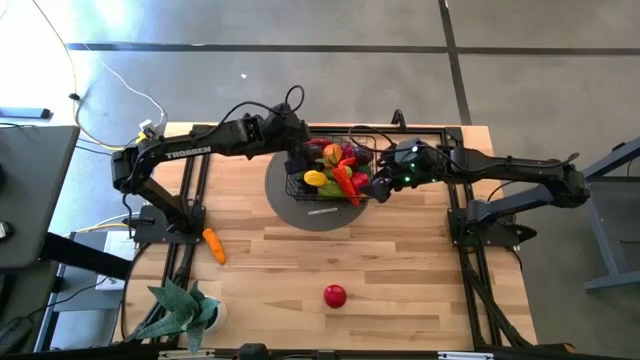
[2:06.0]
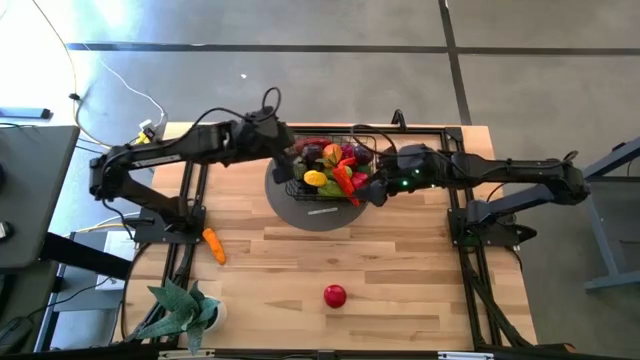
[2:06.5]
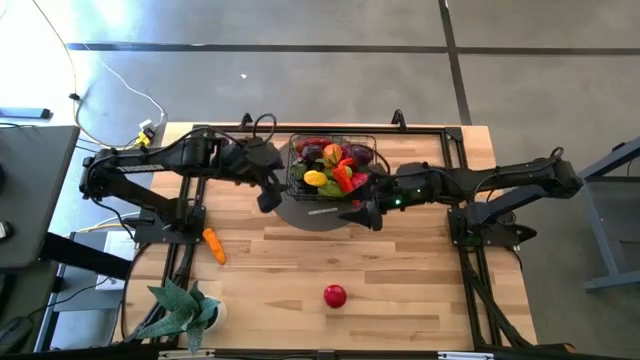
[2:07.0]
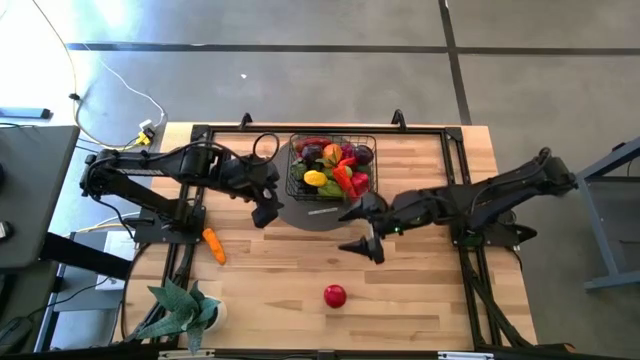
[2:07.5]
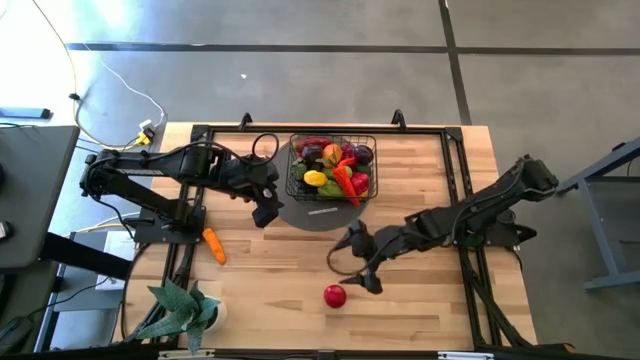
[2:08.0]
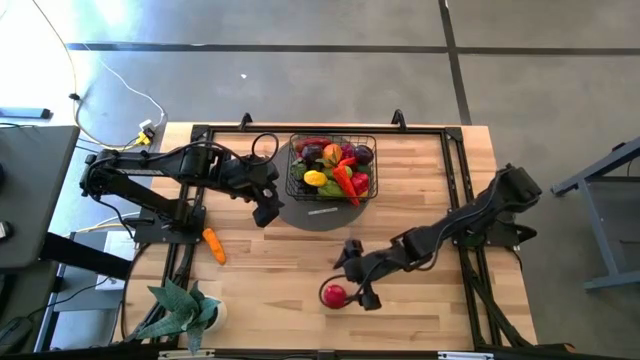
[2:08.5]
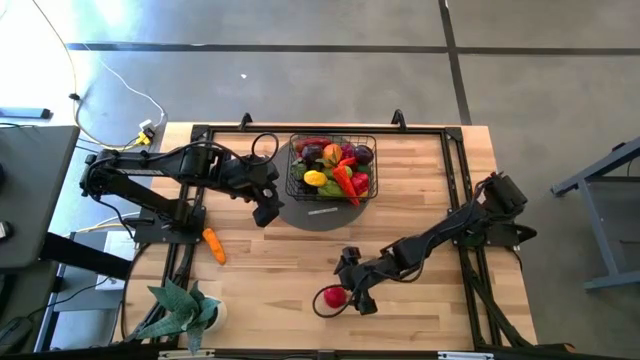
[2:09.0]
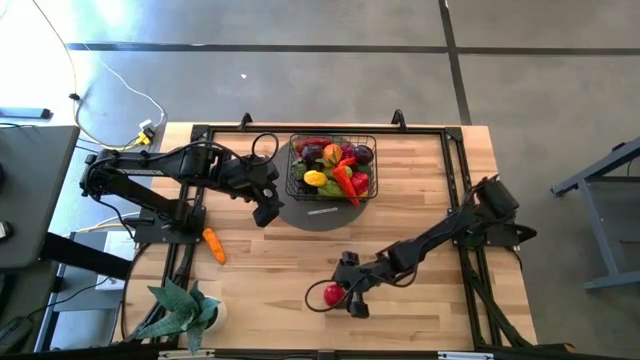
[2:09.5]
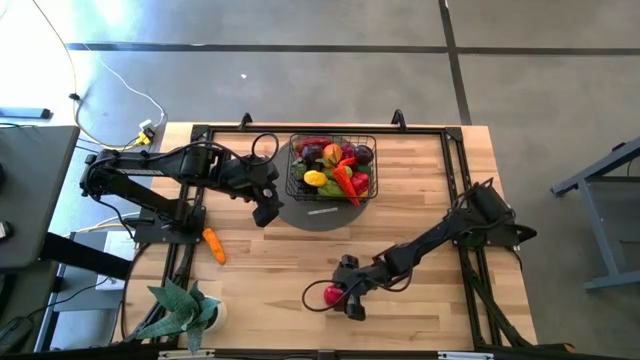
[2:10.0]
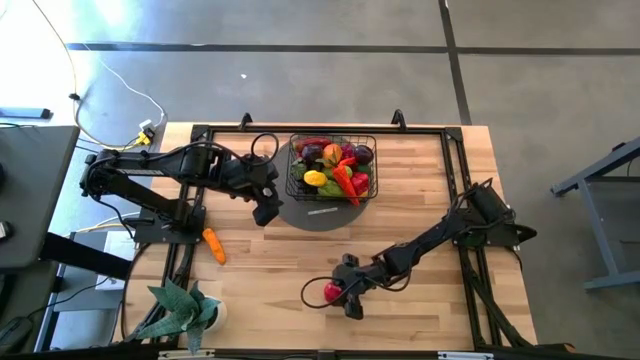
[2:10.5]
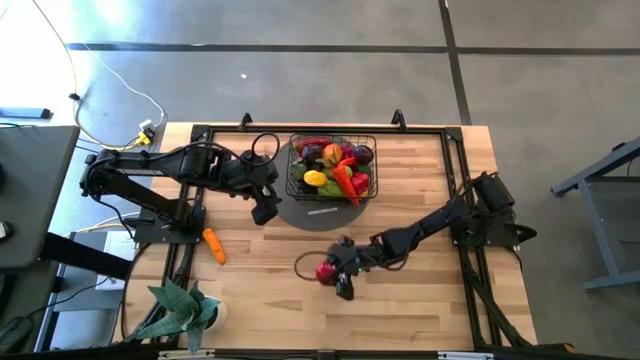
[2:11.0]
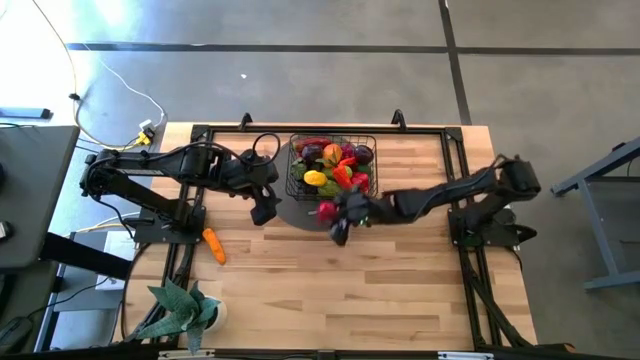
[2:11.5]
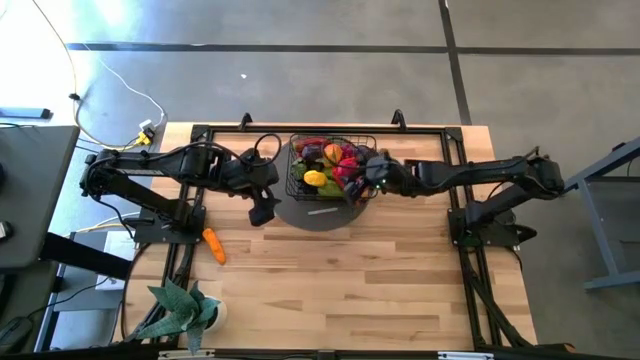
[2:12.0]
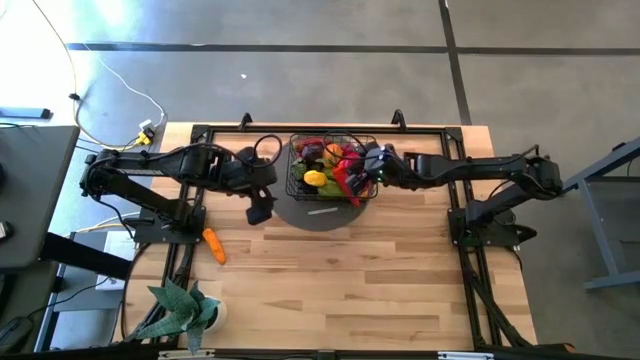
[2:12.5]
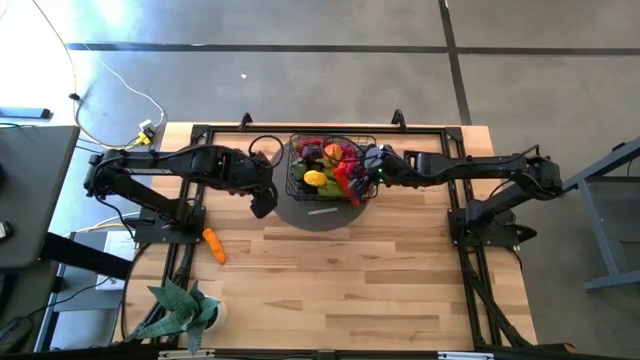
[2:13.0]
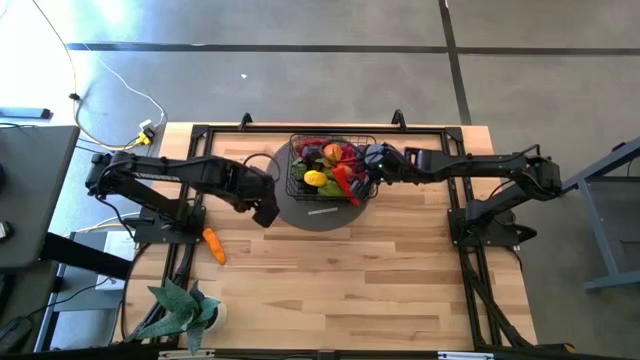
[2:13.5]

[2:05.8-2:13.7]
Task: Build produce basket
Put the red tomato into the black mesh basket

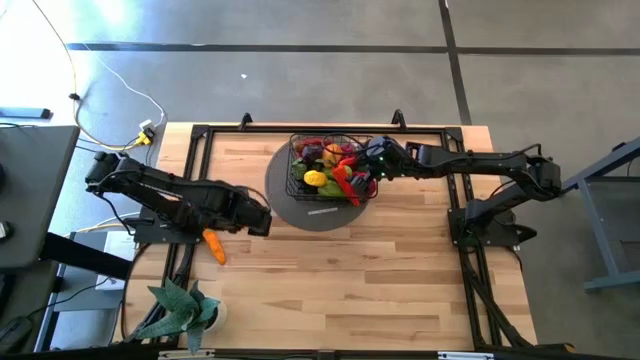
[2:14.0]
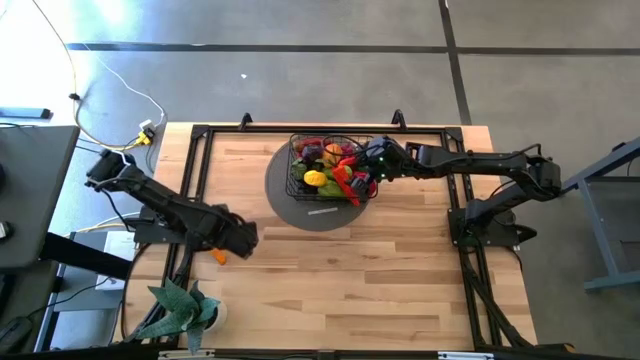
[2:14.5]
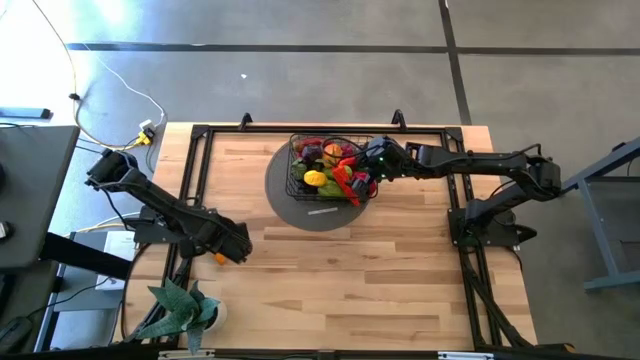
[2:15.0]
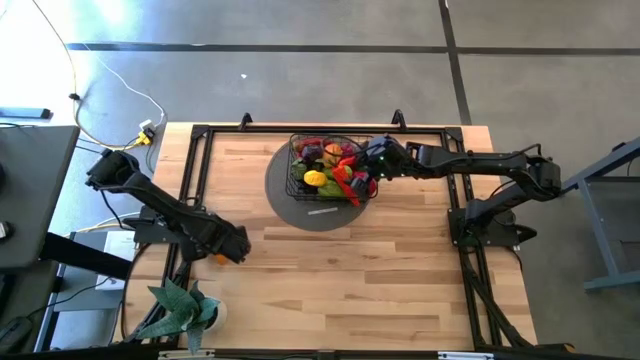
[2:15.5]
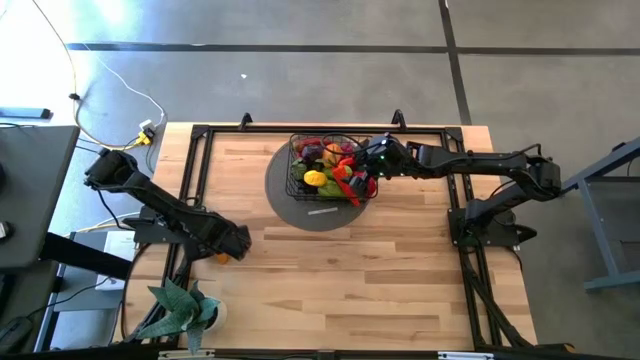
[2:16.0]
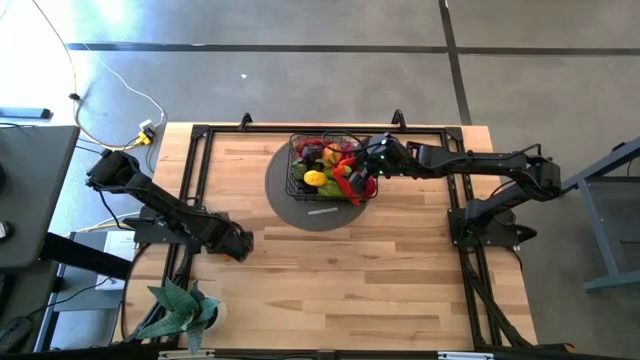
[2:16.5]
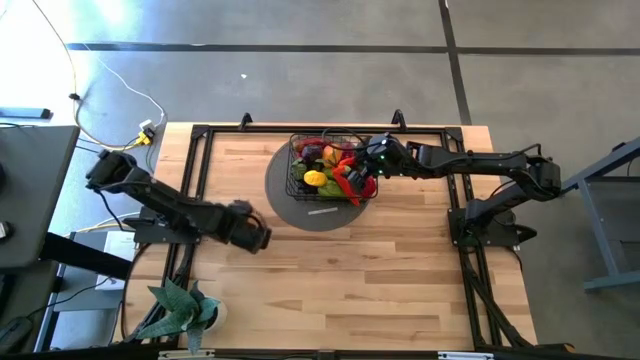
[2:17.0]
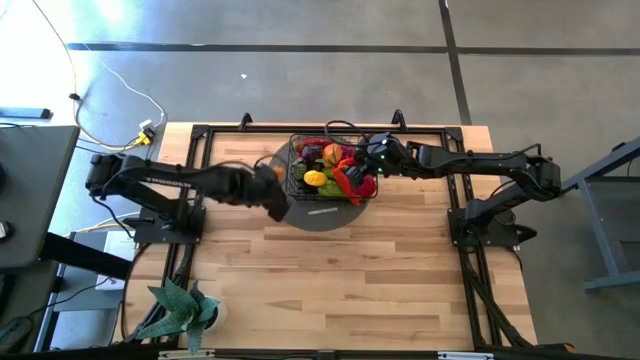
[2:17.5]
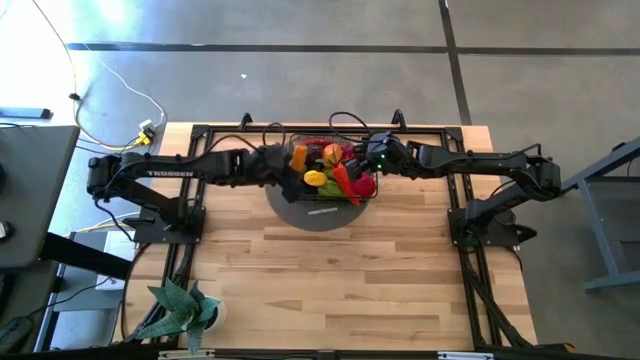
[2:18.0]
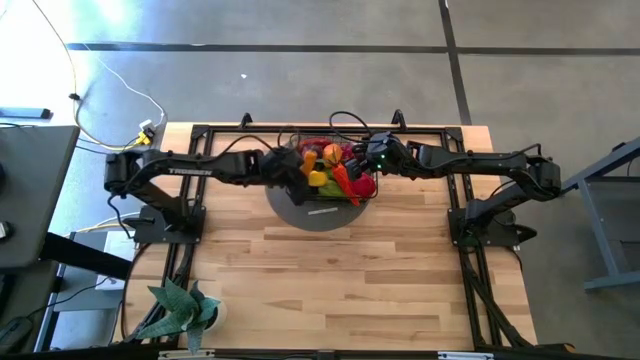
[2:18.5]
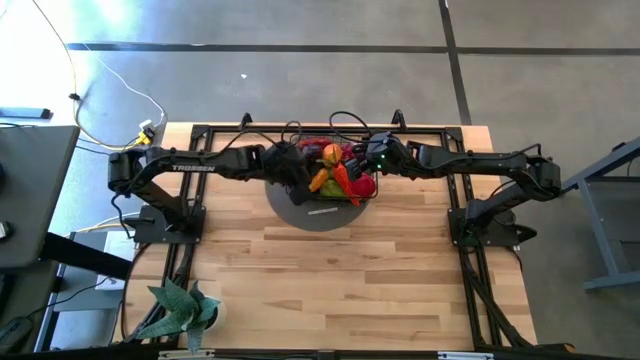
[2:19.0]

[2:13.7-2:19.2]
Put the orange chili pepper into the black mesh basket

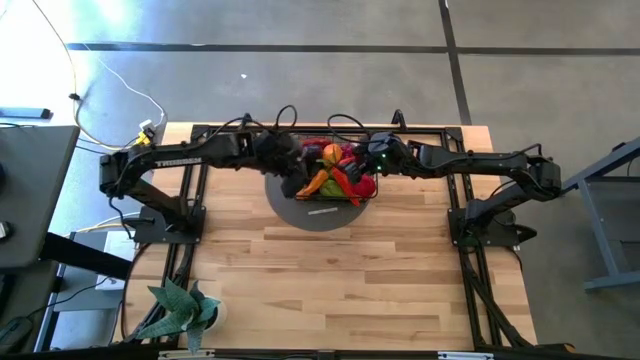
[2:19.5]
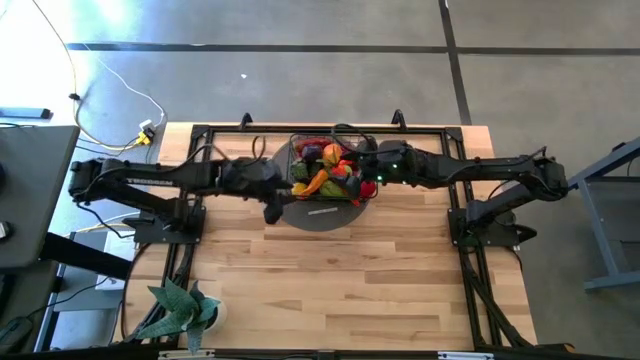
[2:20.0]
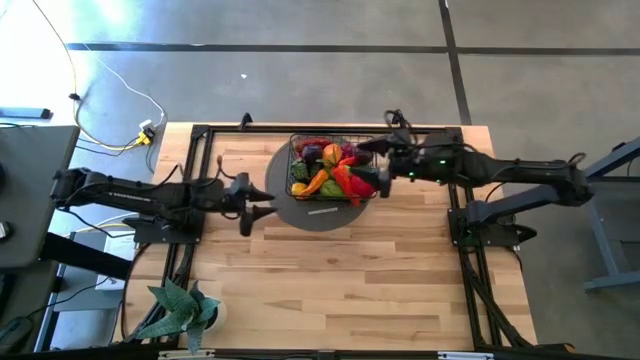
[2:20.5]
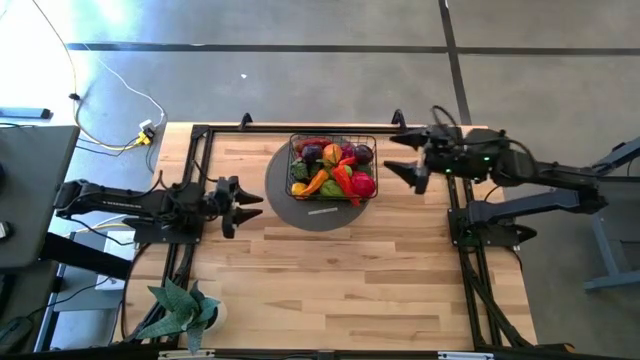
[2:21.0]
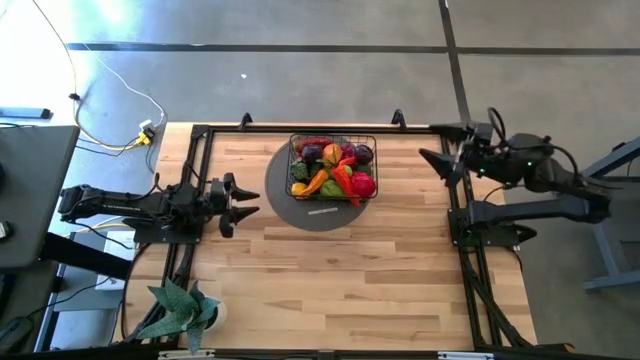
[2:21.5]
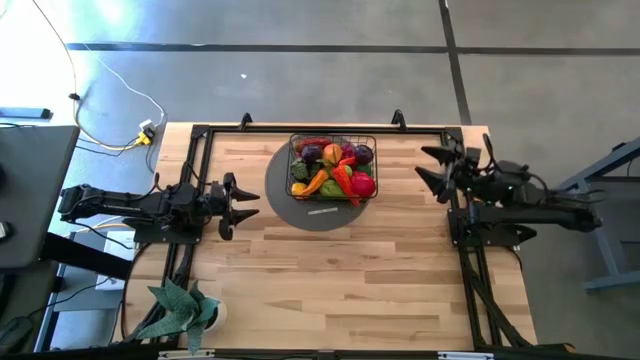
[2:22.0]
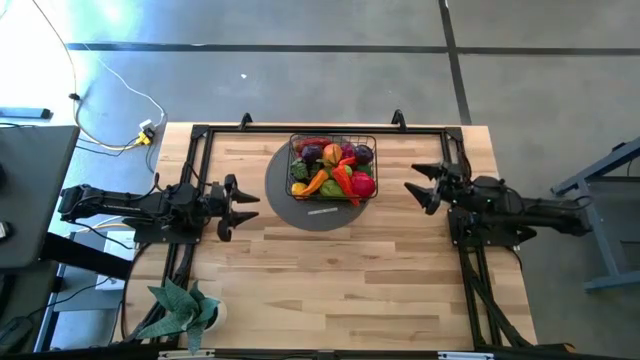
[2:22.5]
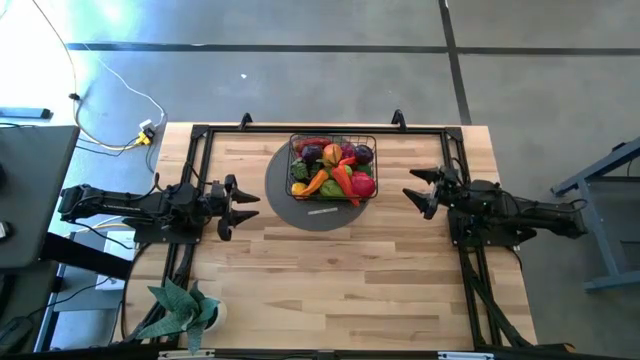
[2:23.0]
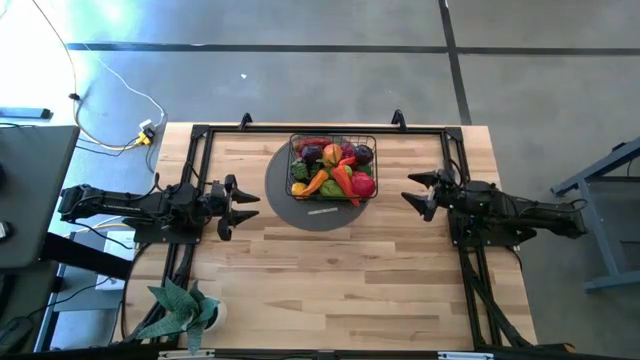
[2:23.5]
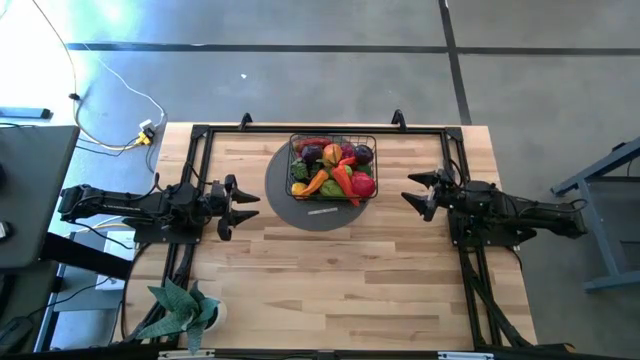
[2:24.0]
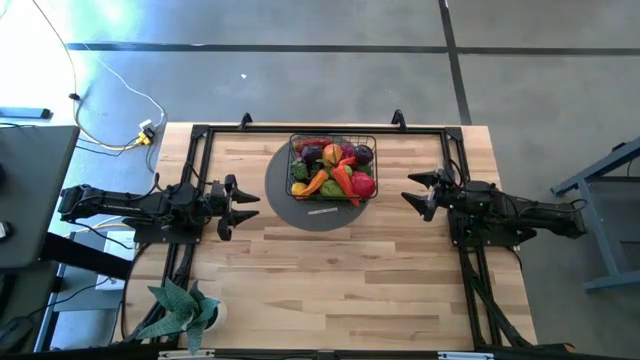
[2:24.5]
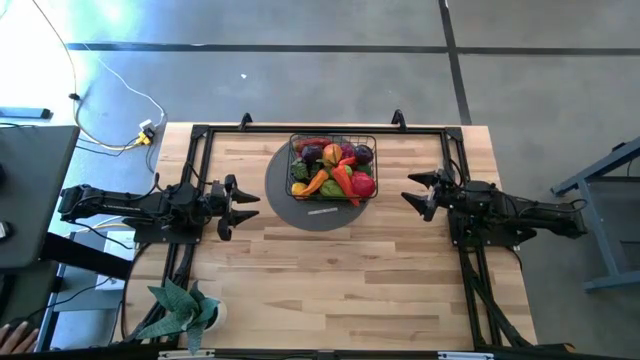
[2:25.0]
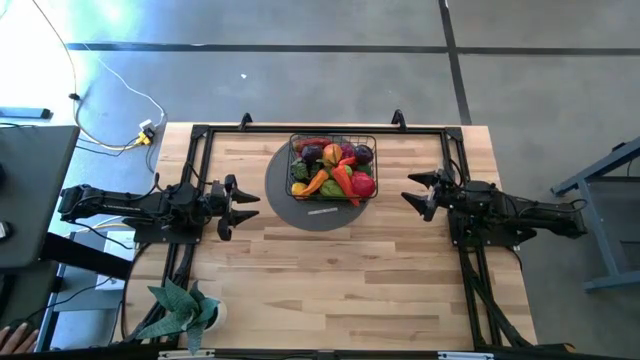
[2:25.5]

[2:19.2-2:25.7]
Return to Home Position

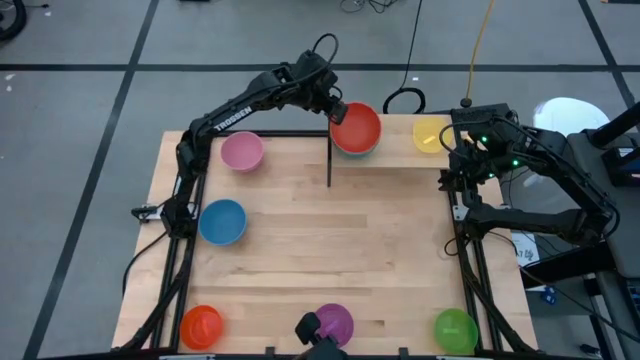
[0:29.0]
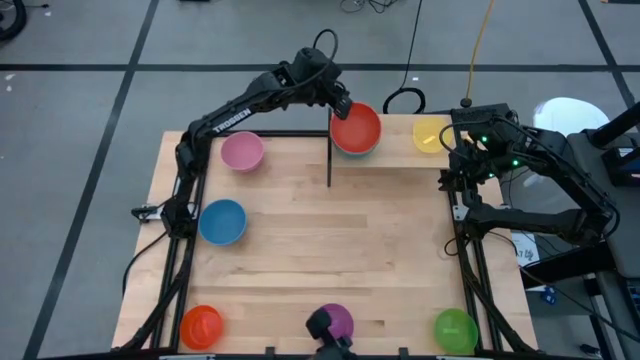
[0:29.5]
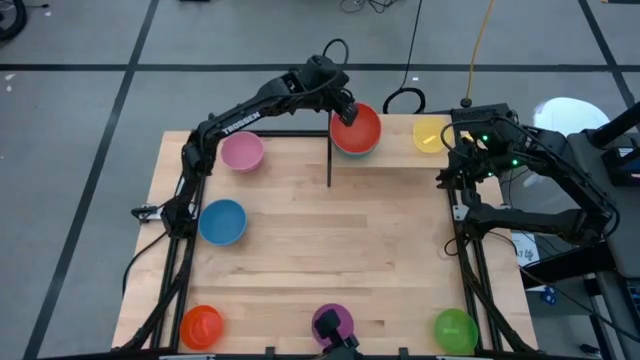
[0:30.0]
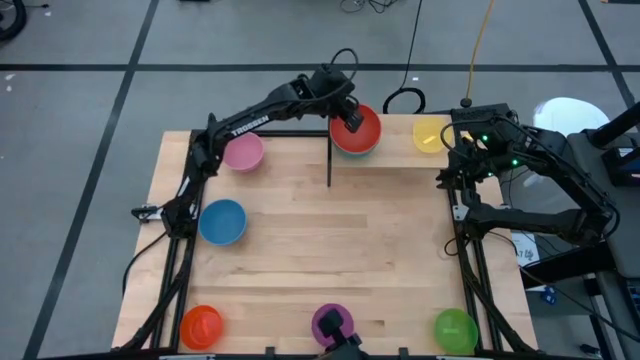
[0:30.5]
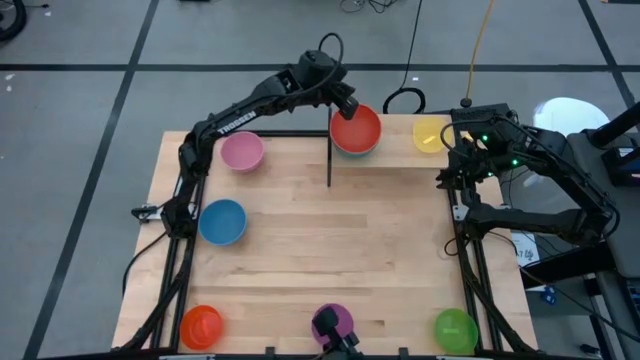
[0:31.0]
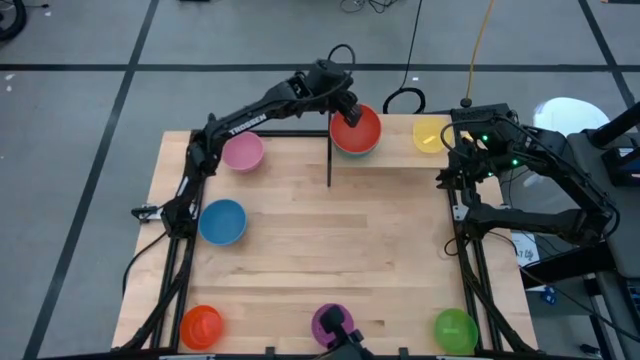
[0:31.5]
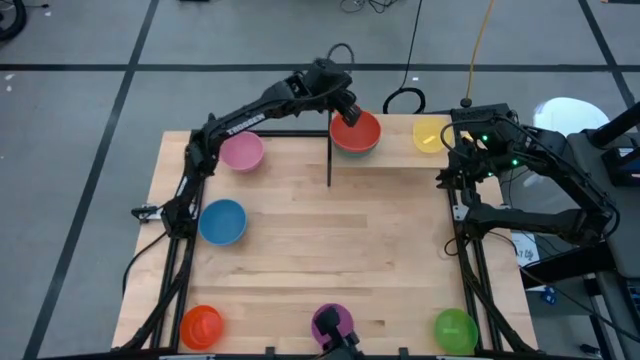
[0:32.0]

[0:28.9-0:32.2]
Task: Place and stack bowls onto a shelf
Adjust the orange bowl on top of the dark green bowl on the shelf
